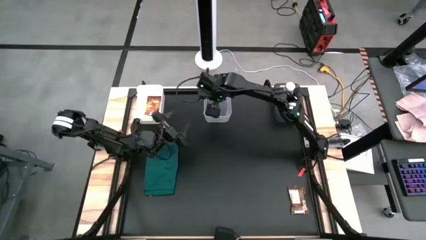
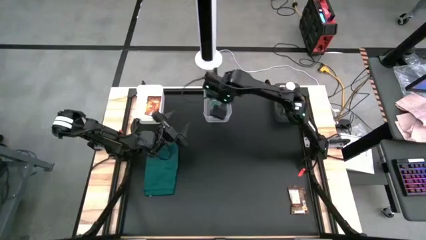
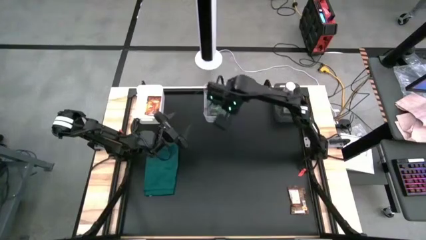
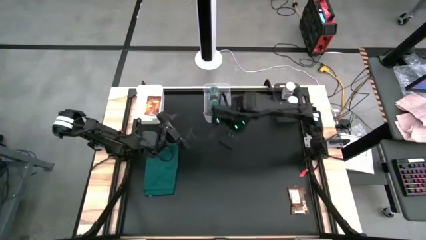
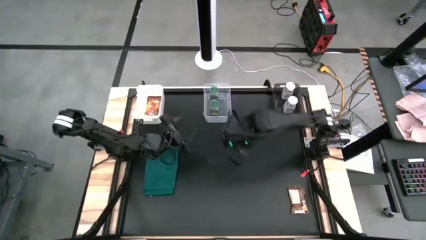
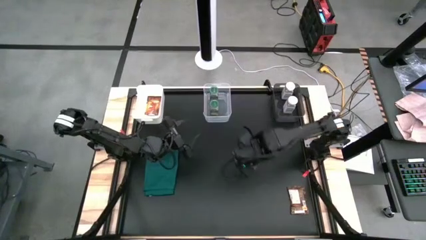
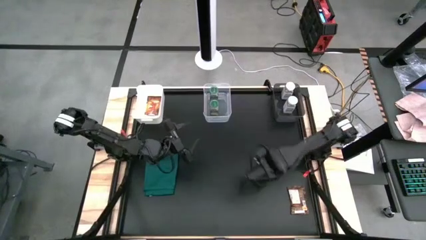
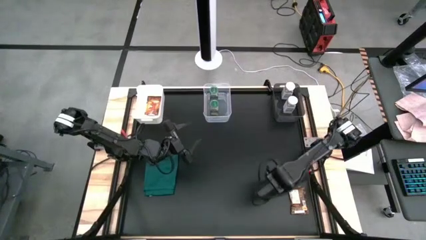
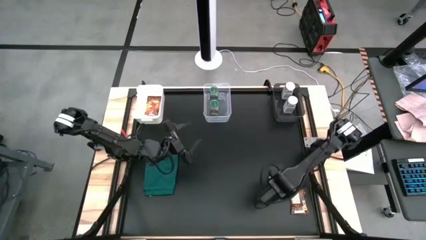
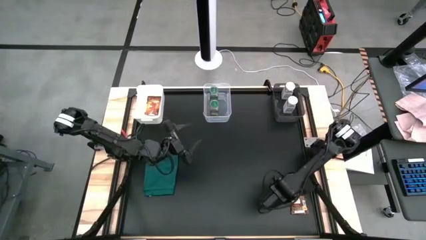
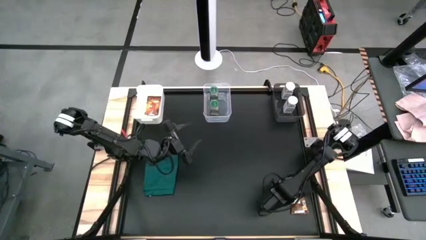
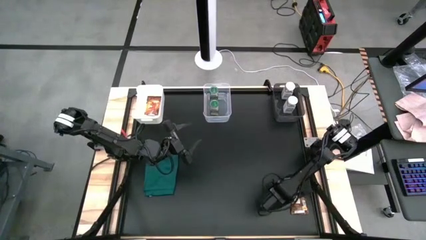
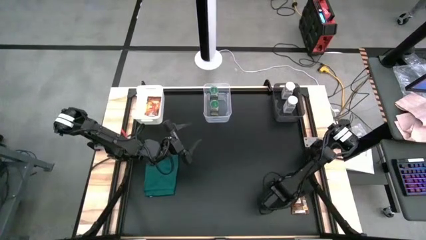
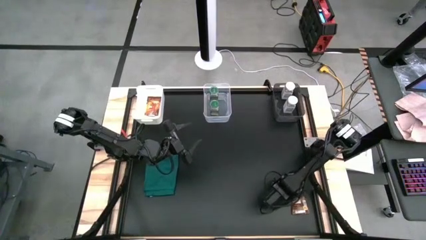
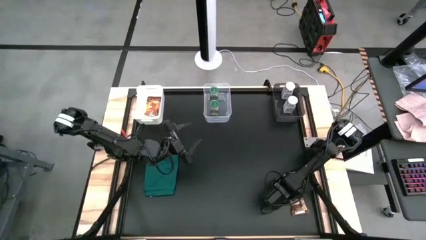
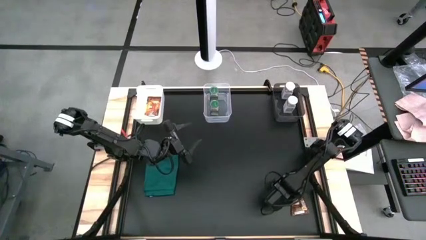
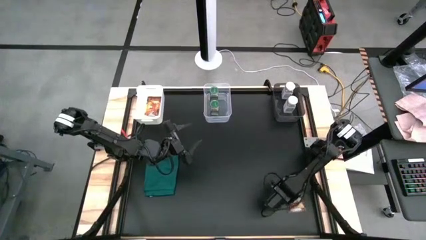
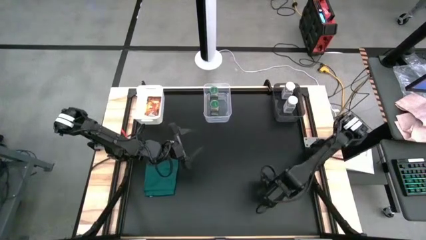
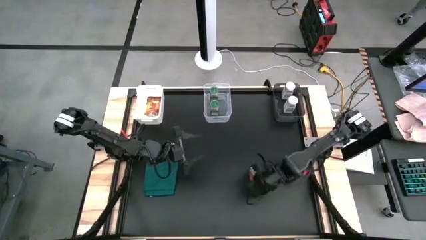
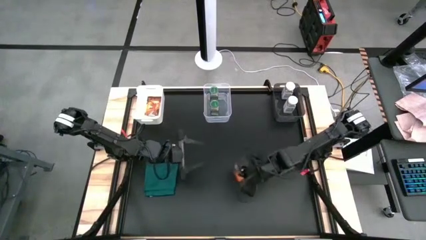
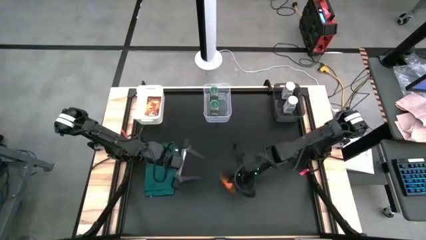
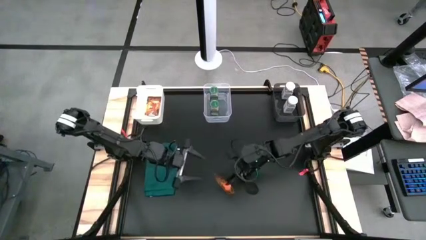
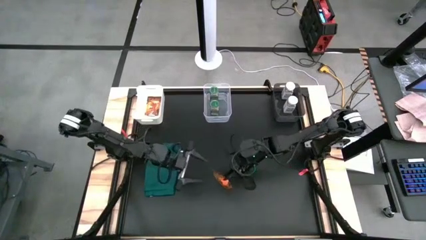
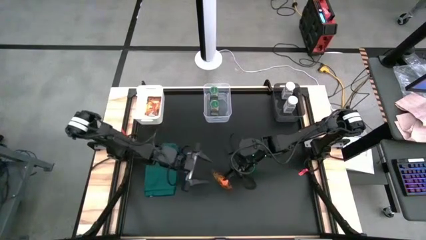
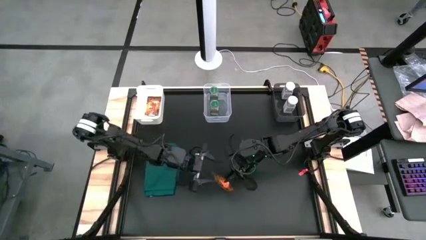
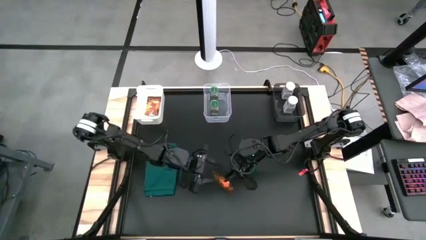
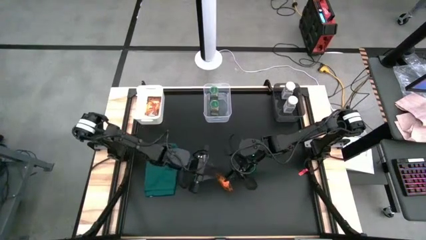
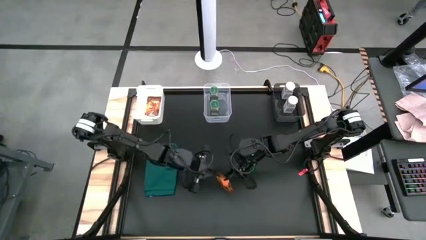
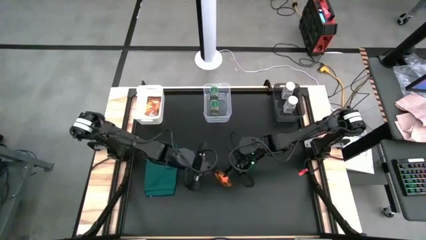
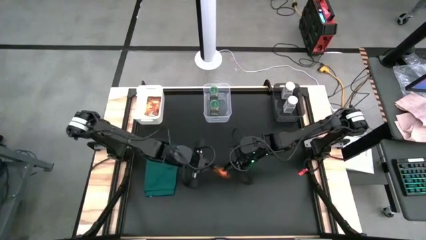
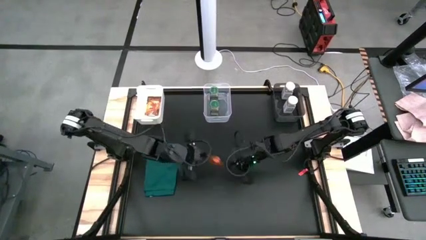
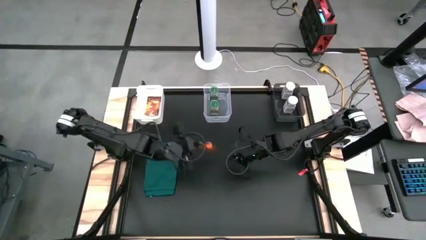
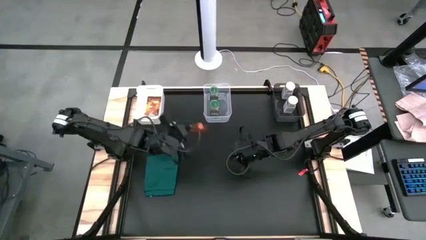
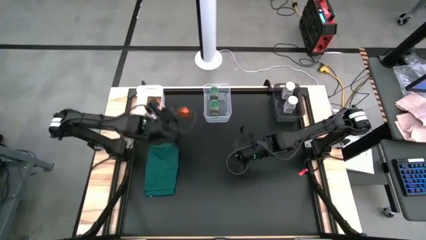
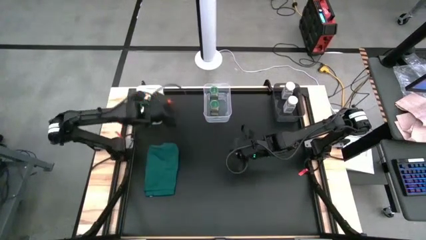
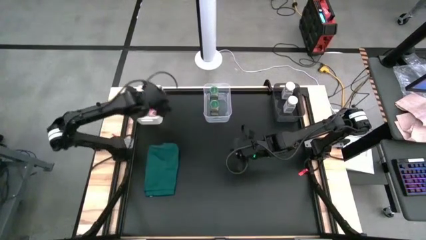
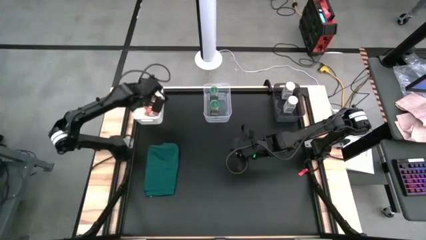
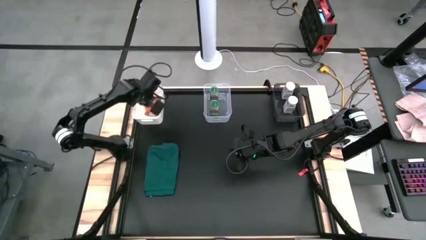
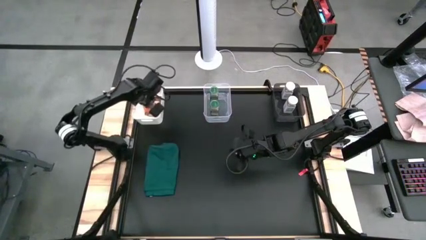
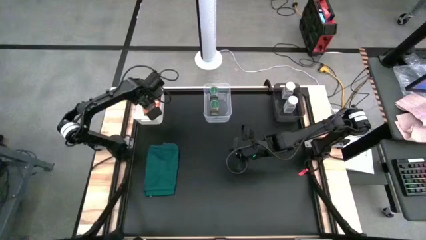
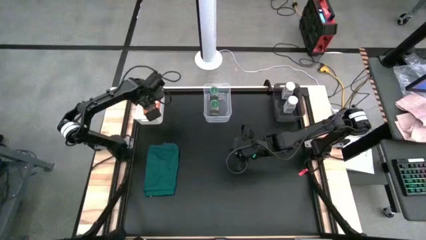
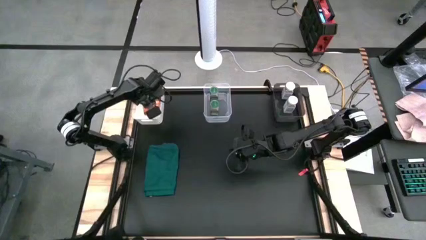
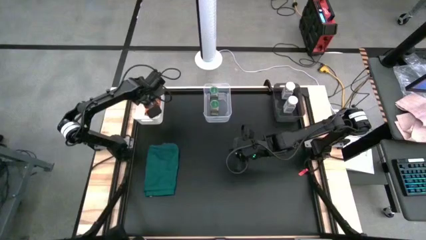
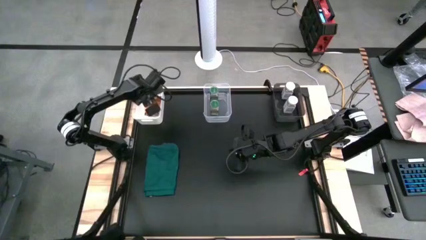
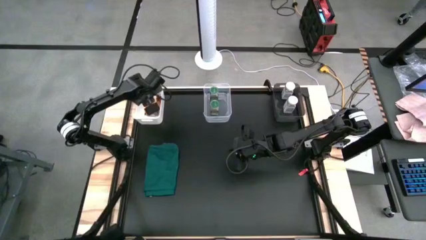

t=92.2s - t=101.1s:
Task: Sort spices by type
Put the orange seasoning pack into the white bin

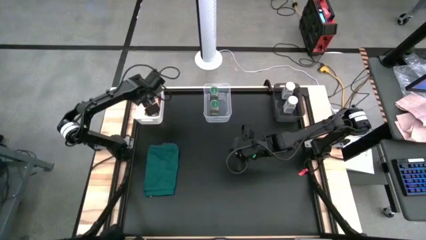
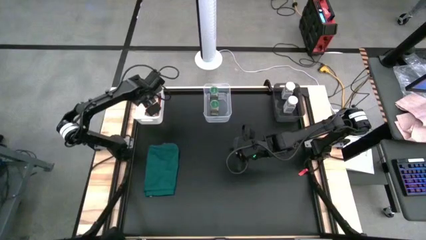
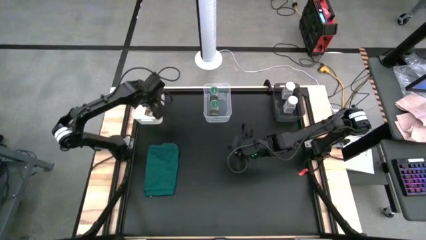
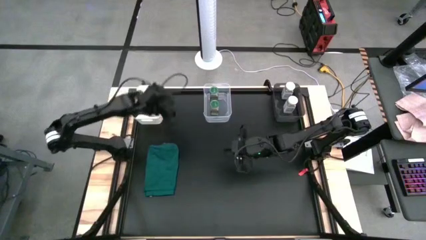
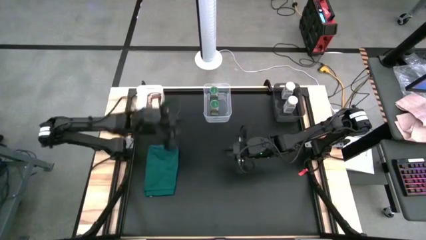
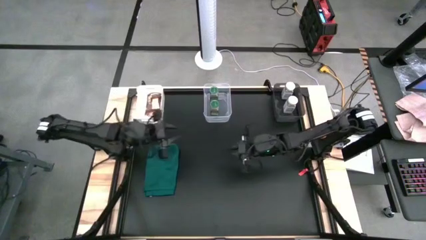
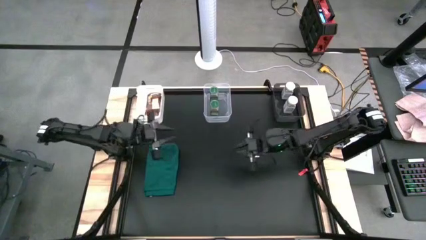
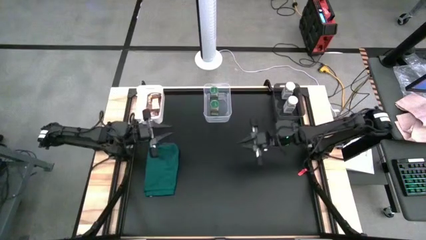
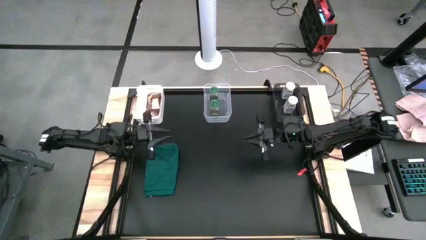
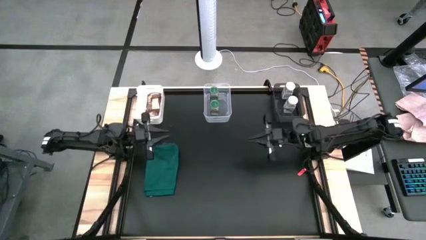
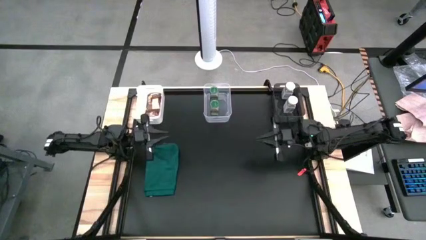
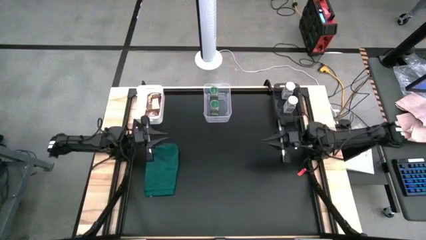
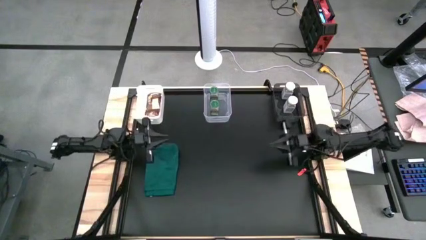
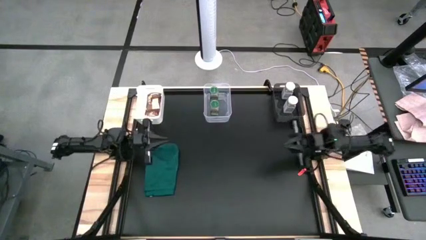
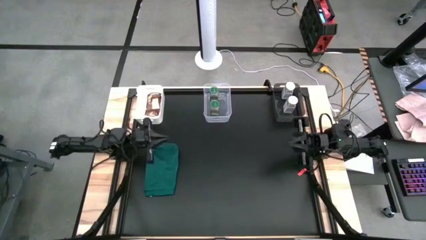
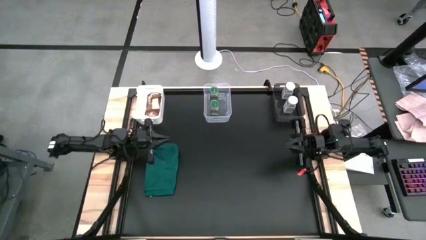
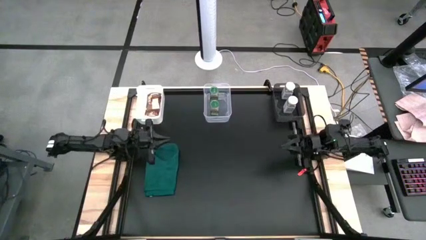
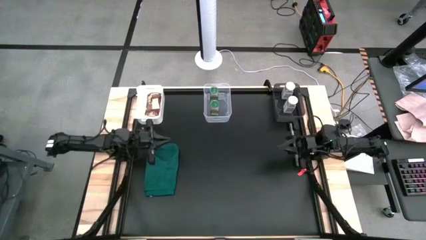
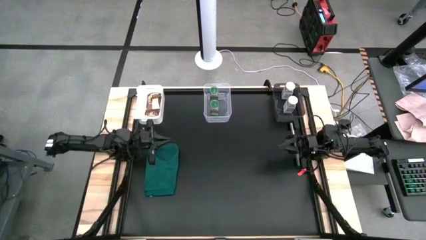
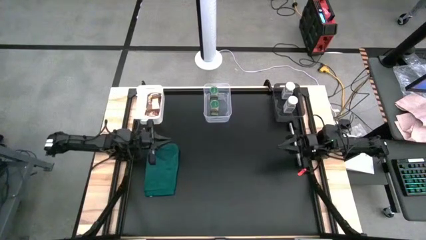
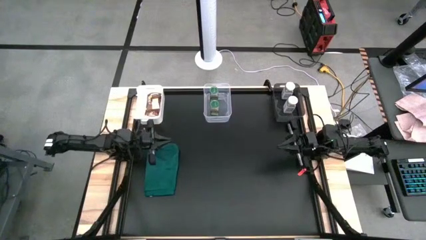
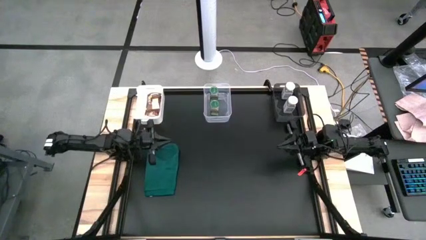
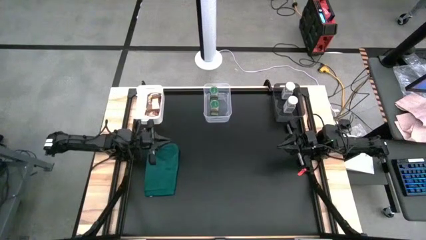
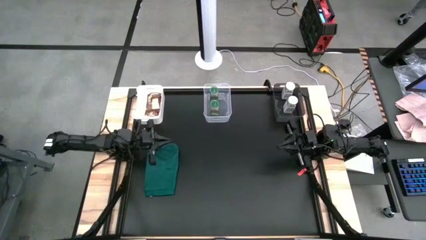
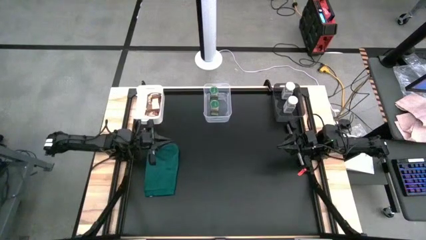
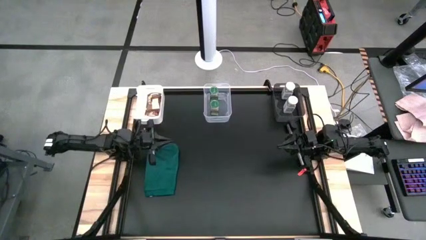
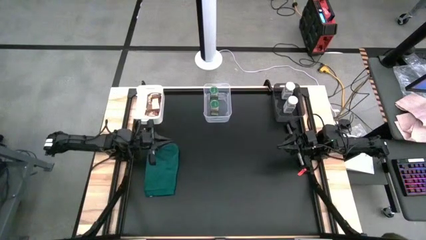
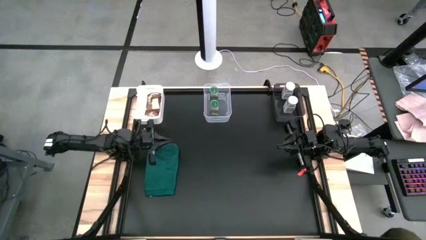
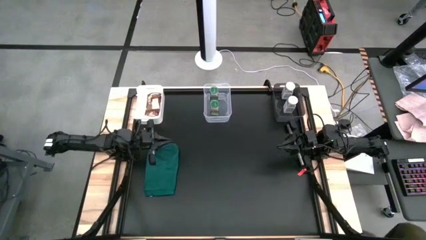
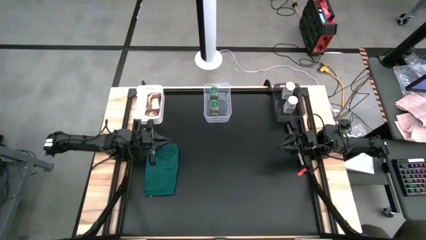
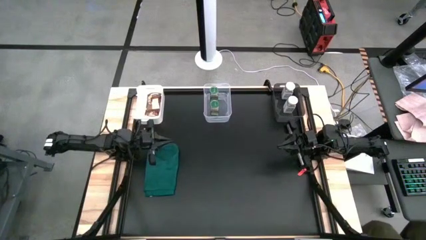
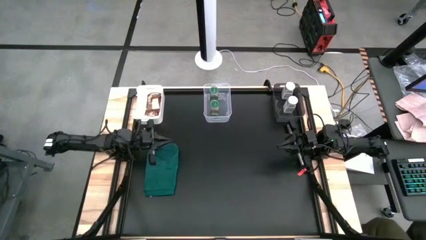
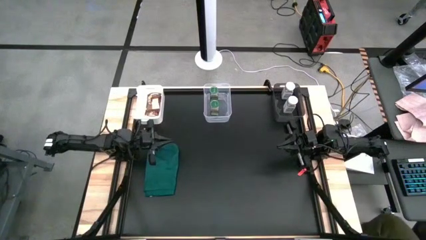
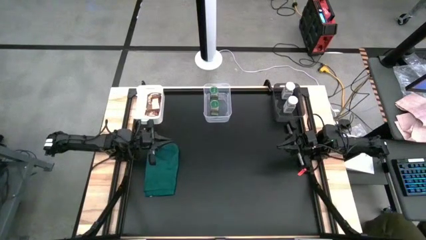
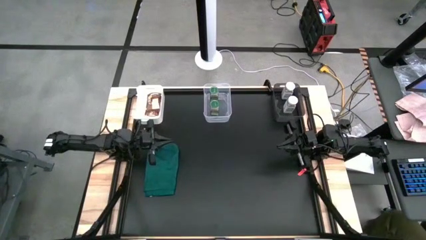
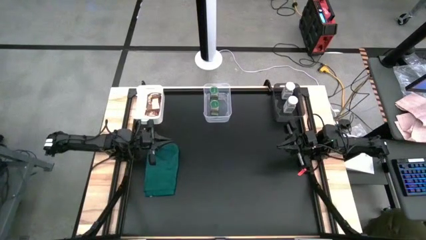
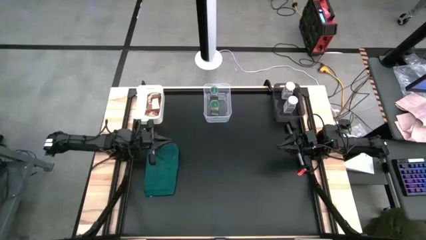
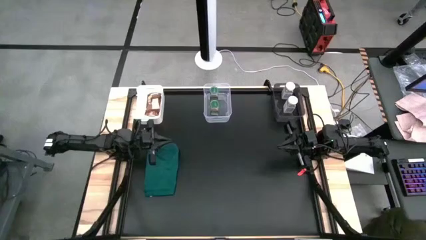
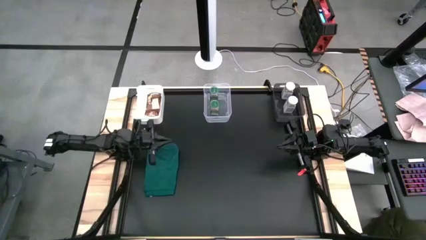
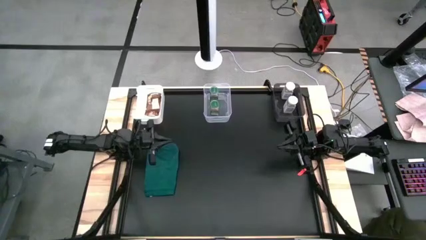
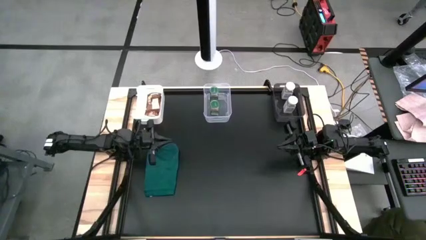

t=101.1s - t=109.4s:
Return to Home Position
